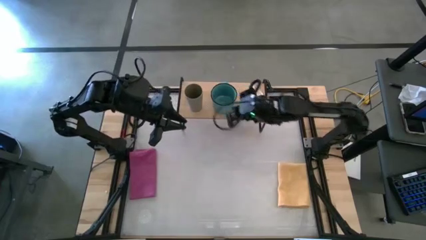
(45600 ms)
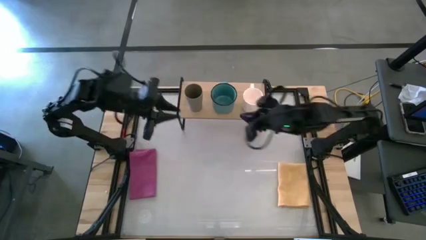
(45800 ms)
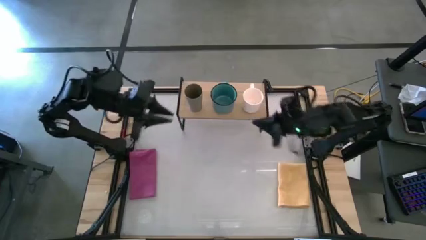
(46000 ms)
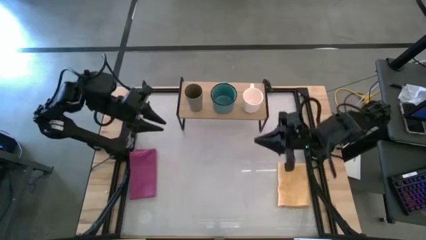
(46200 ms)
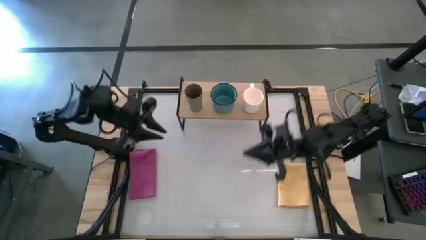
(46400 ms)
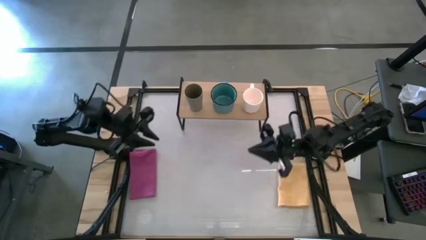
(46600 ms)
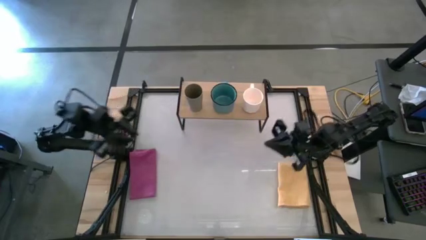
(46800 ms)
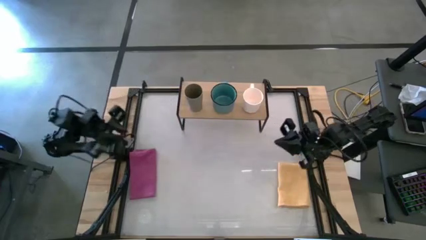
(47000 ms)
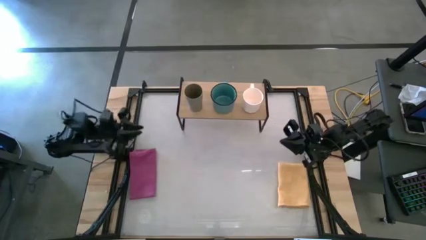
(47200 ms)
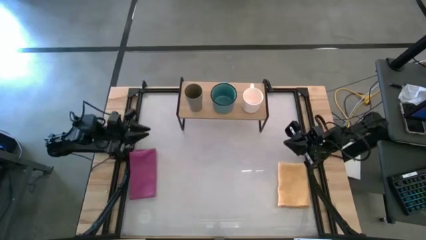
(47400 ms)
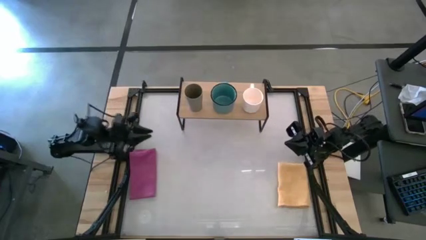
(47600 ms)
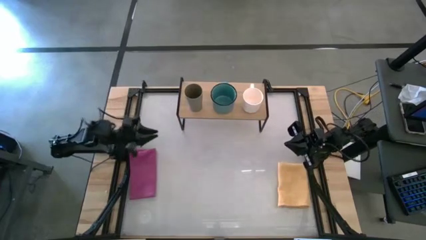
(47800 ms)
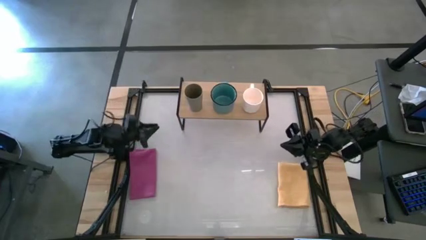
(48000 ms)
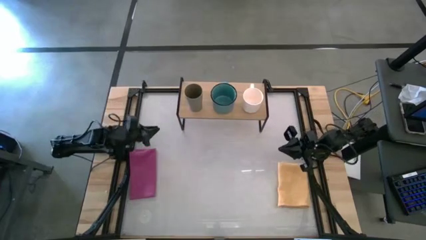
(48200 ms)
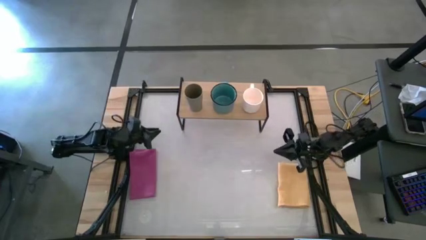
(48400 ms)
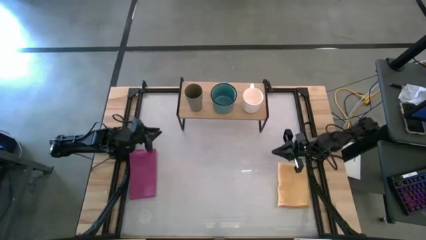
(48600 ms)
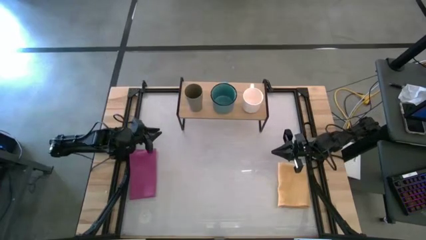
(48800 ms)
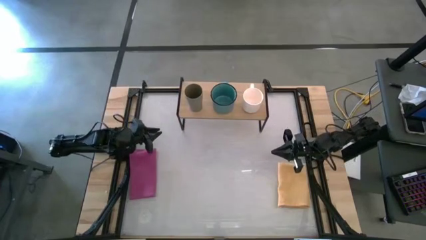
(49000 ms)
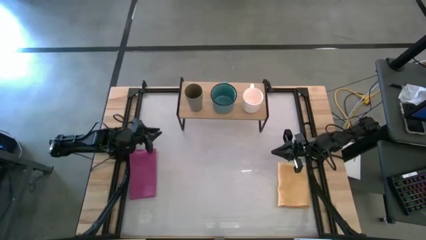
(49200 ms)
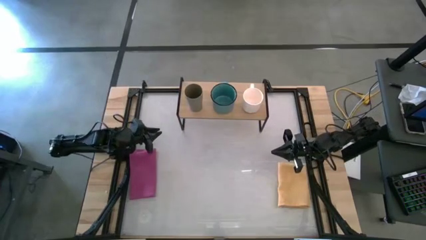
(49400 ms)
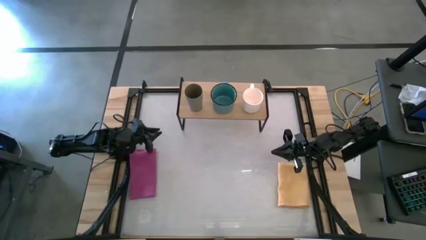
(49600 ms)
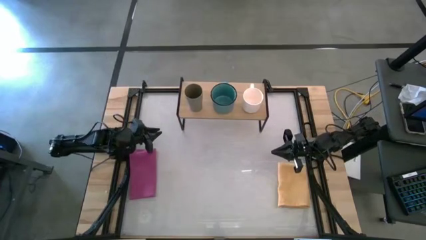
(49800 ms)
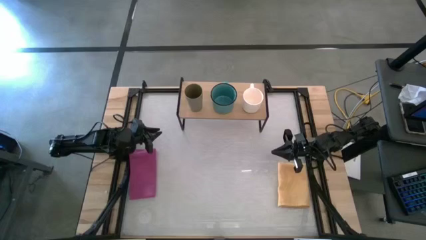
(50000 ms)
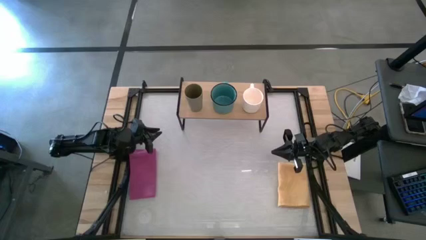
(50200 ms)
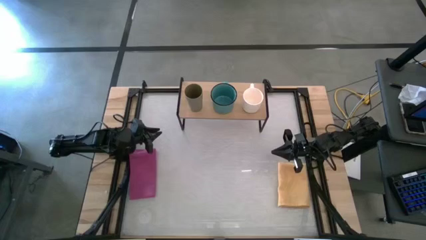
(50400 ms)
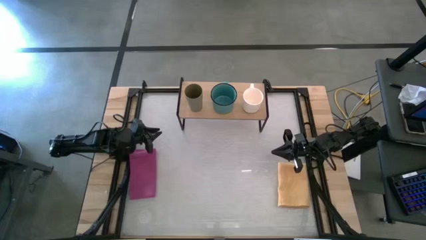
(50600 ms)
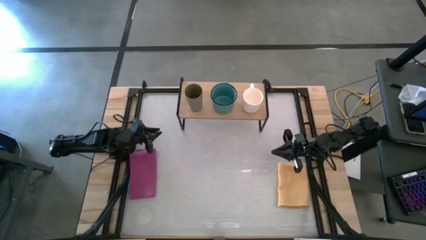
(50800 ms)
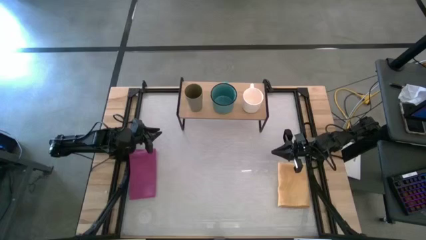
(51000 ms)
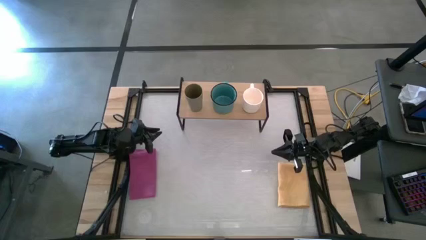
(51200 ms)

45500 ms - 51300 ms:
Task: Stack small to large cups/mugs on shelf
Return to Home Position

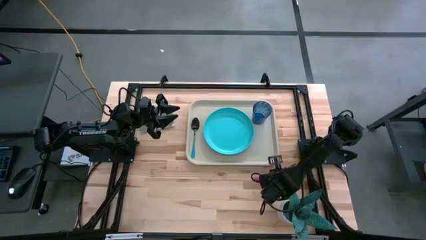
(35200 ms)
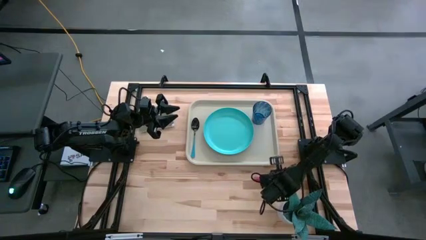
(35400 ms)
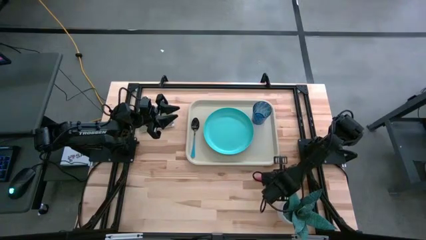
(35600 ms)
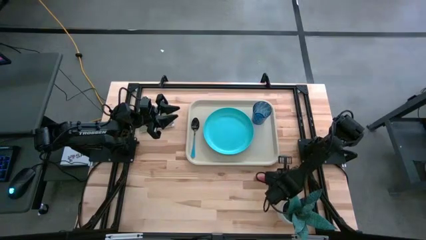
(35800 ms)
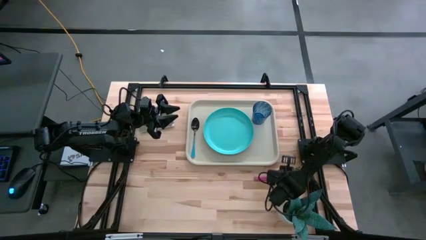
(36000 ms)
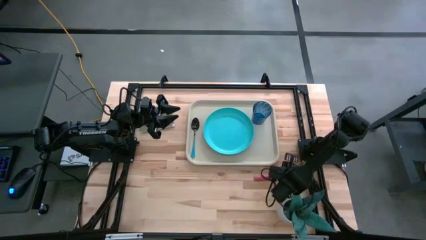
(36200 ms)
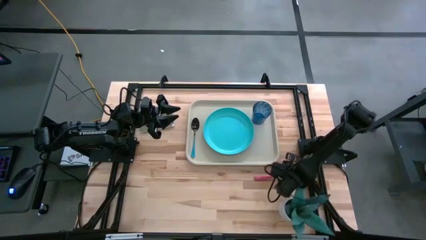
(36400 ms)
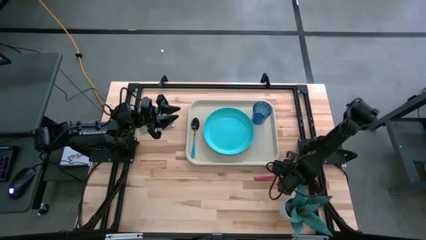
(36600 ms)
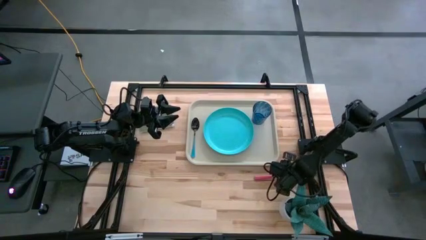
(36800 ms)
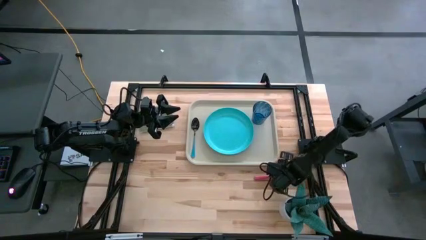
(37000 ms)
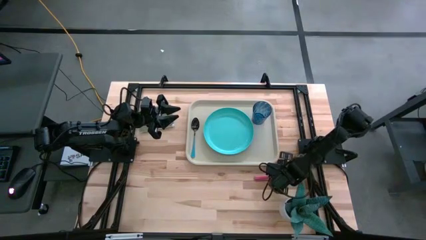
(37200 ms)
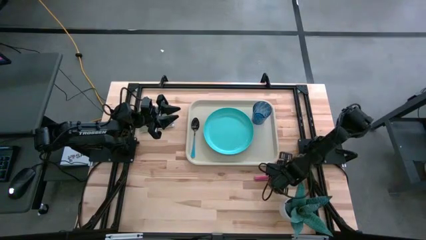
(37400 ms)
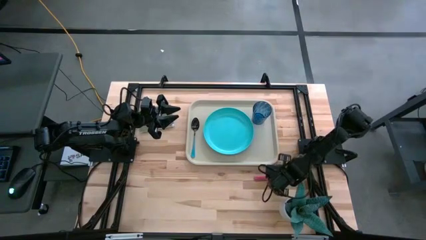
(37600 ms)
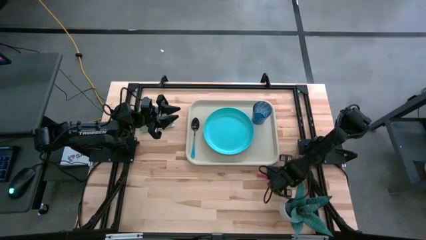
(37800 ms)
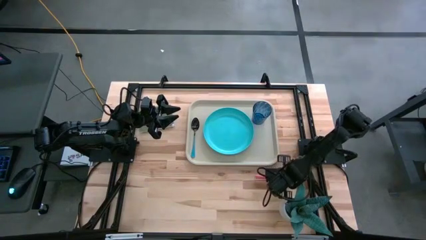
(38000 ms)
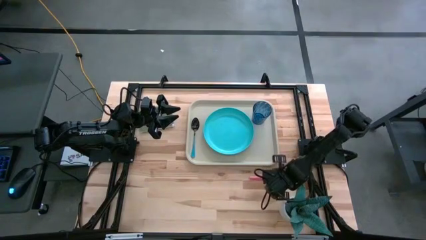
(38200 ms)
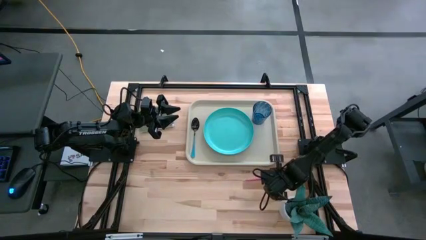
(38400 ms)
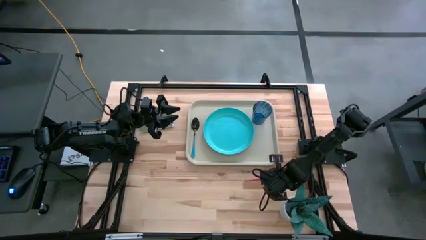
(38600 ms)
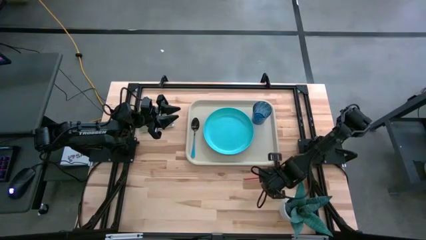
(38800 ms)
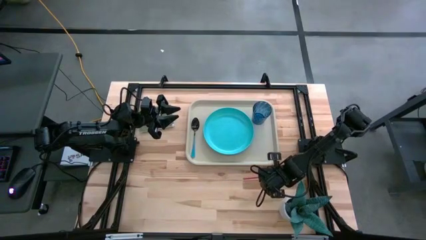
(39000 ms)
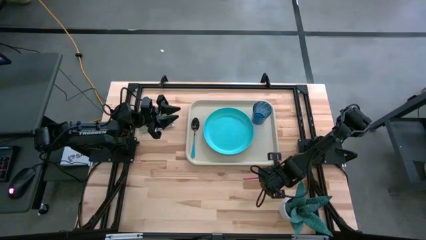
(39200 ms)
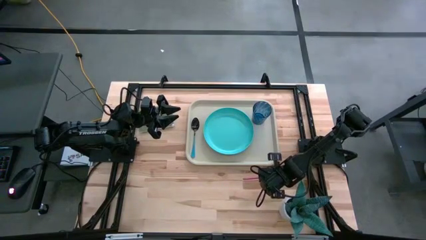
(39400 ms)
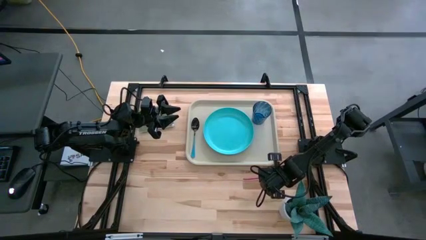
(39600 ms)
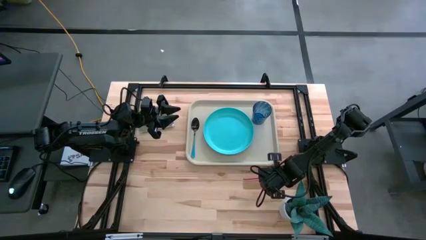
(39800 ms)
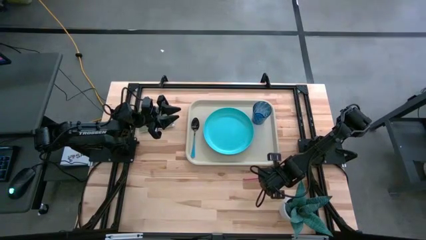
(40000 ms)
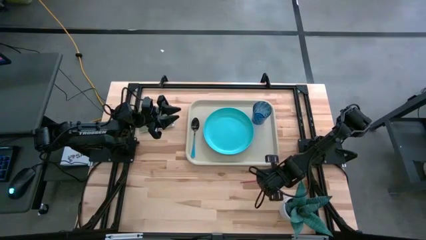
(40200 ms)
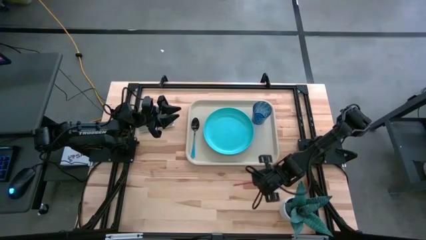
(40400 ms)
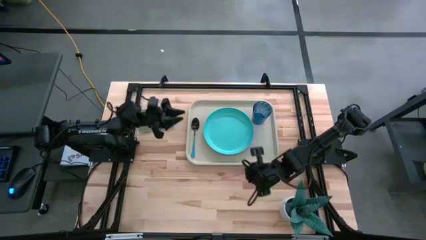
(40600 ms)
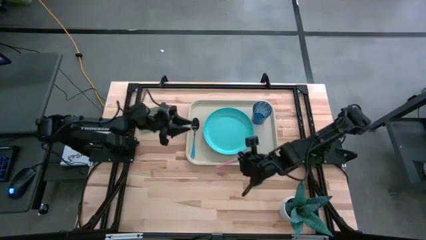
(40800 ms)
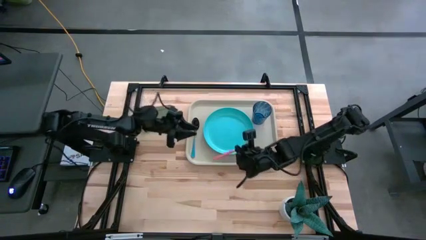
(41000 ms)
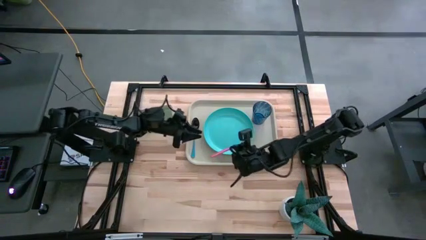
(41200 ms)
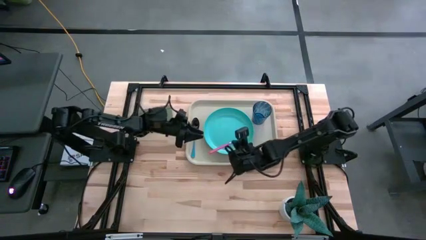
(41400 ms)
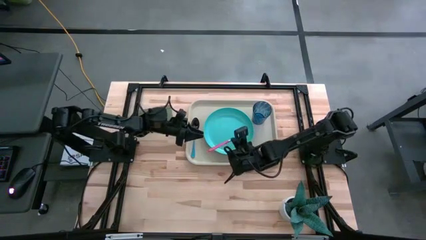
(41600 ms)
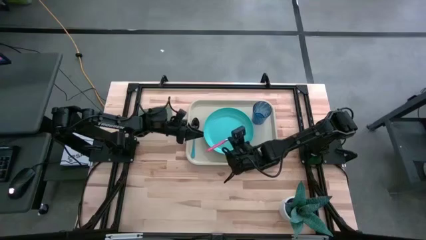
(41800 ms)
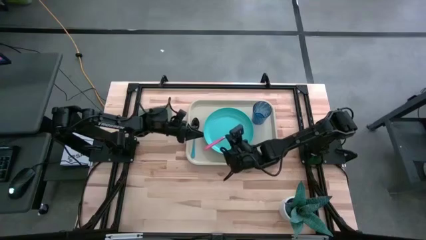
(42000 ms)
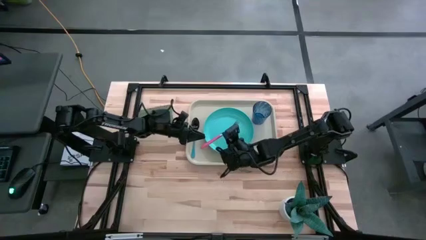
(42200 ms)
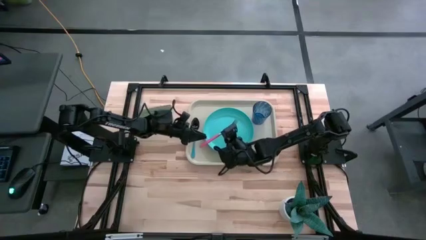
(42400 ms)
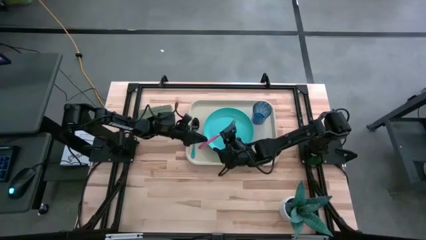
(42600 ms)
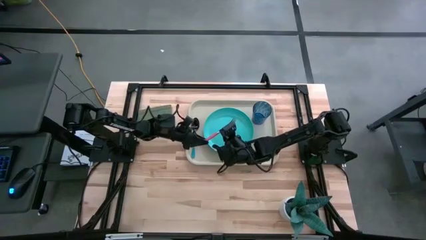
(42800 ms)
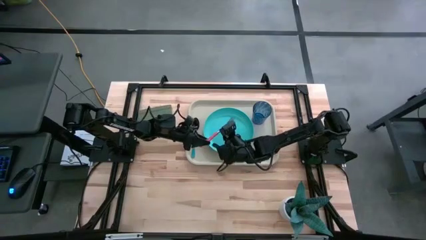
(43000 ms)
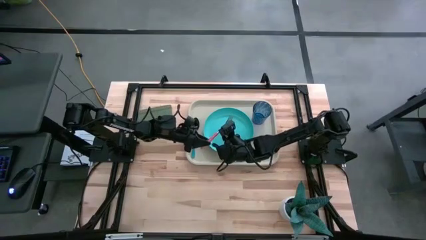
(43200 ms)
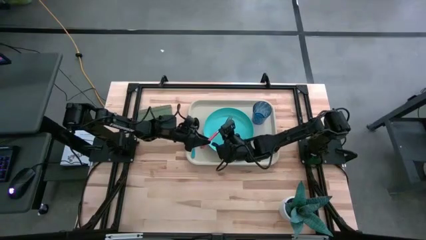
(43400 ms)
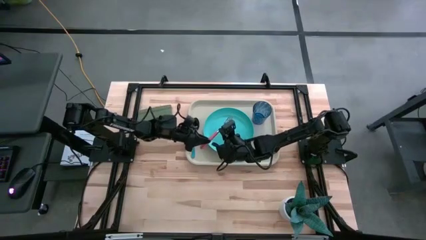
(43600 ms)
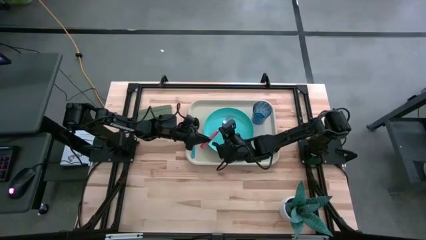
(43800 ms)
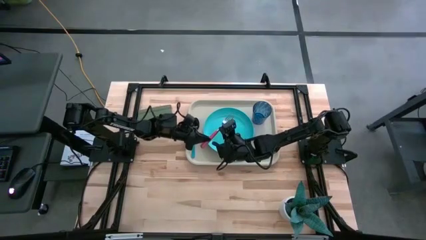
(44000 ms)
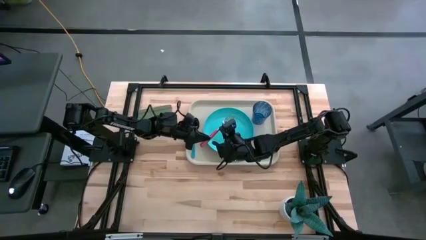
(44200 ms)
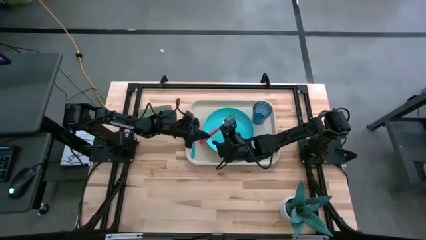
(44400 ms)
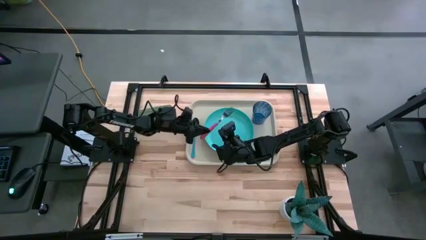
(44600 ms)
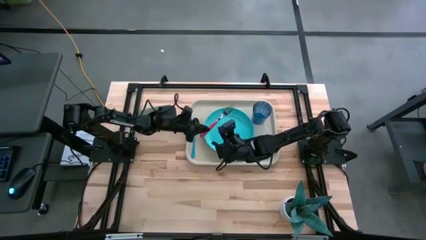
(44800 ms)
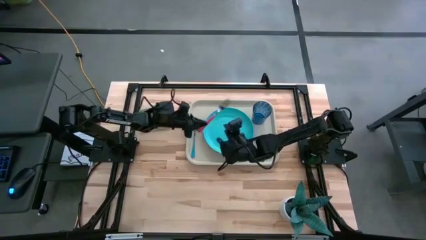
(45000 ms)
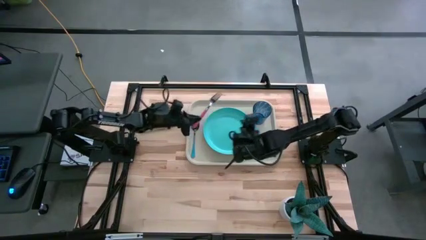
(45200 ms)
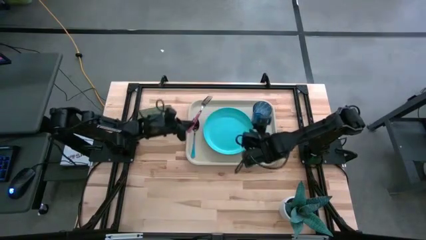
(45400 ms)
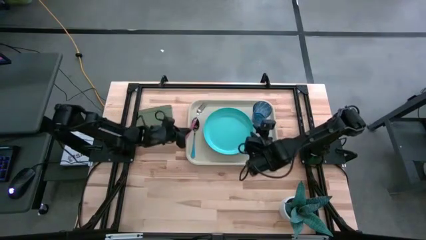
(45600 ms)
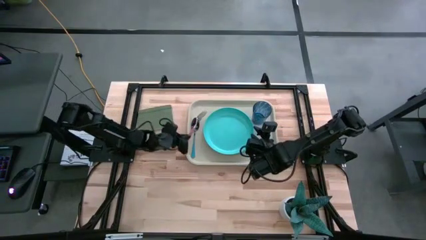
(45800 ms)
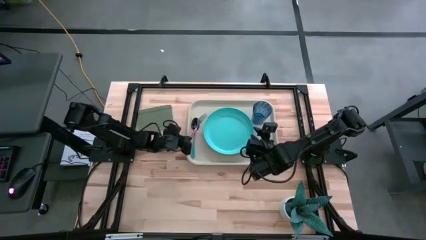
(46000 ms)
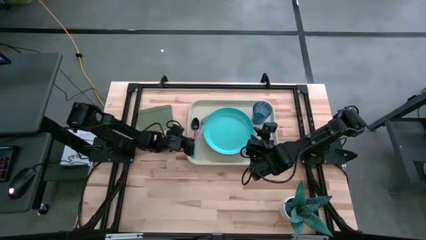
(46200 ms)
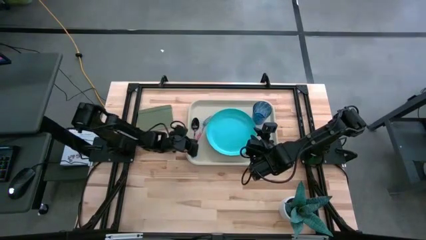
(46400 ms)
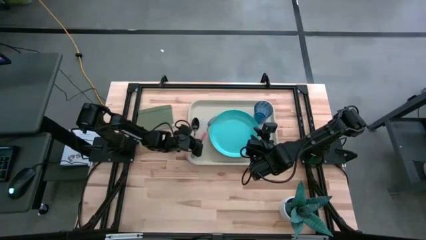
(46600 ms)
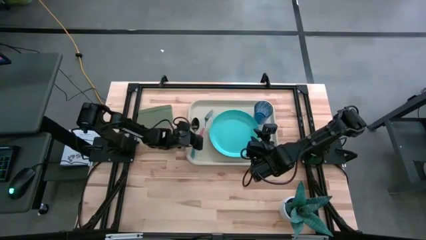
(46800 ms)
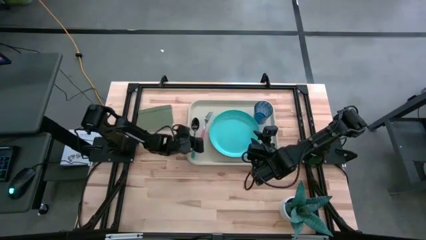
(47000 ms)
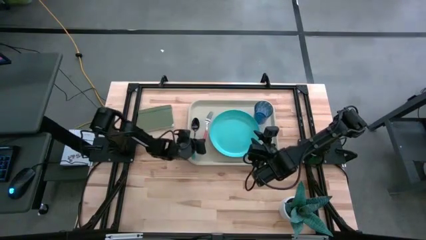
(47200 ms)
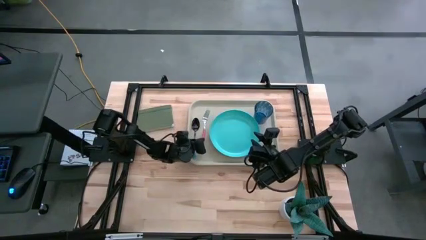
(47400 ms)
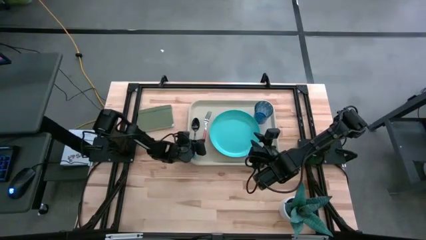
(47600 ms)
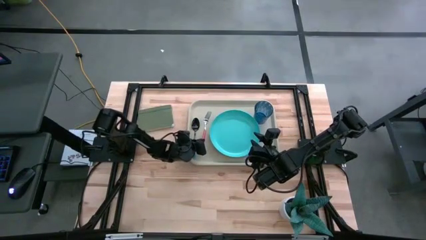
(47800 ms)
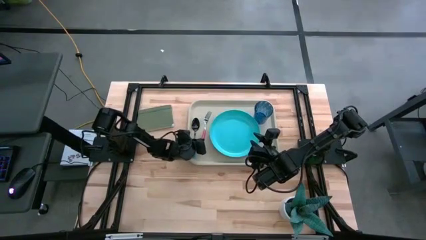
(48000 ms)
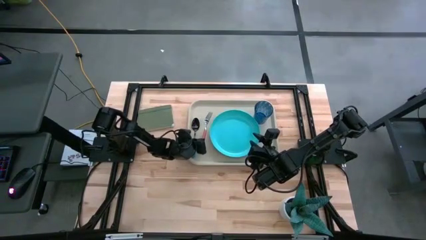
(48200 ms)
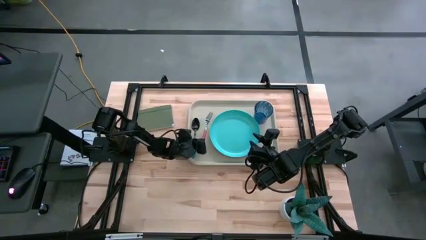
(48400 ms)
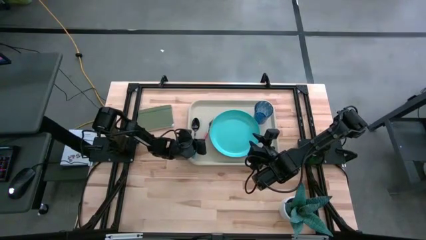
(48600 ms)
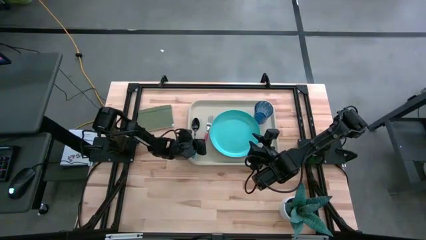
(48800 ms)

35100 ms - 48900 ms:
Task: Pick and place plate/cup/fork/spoon on tray
Put the pink fork on the gray tray beside the blue plate
